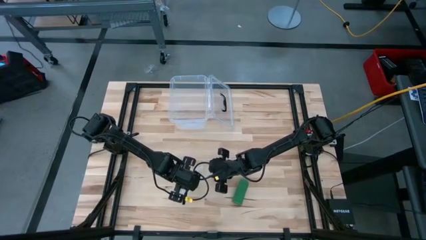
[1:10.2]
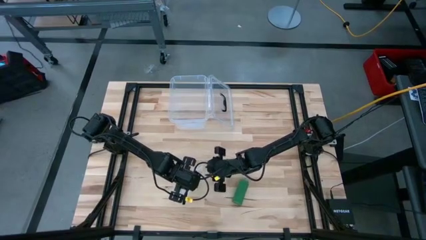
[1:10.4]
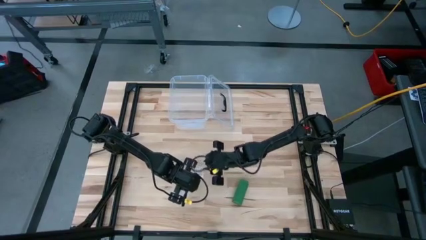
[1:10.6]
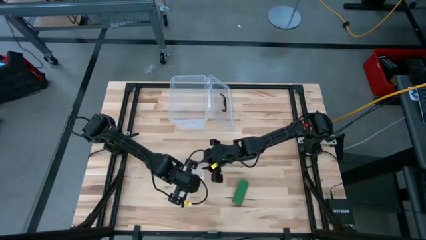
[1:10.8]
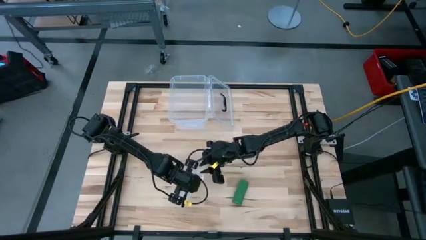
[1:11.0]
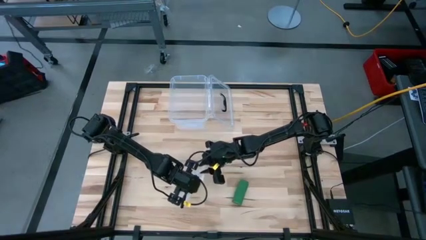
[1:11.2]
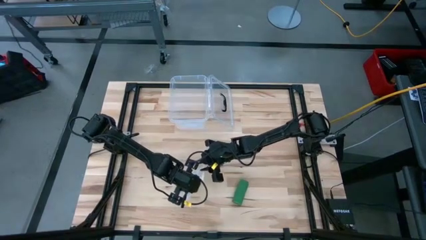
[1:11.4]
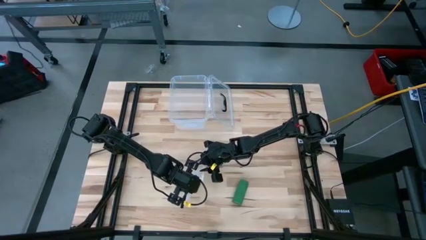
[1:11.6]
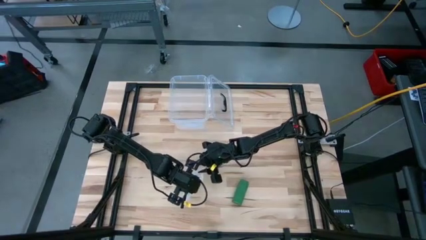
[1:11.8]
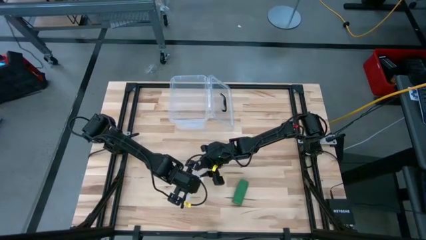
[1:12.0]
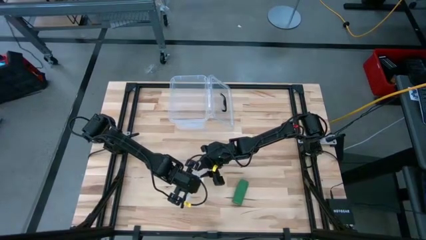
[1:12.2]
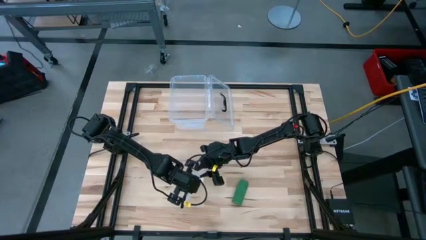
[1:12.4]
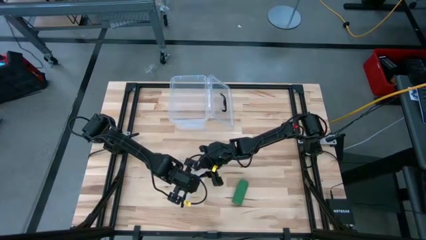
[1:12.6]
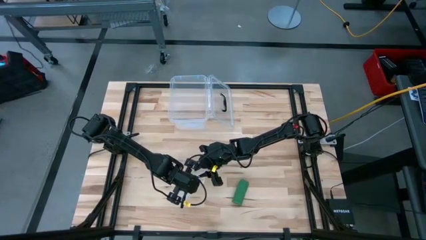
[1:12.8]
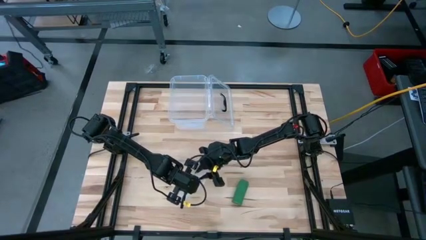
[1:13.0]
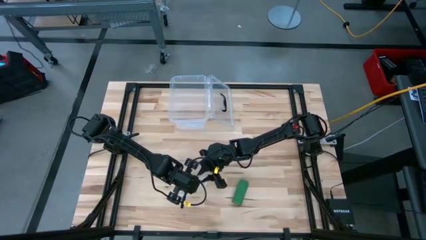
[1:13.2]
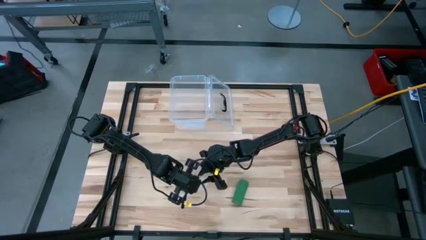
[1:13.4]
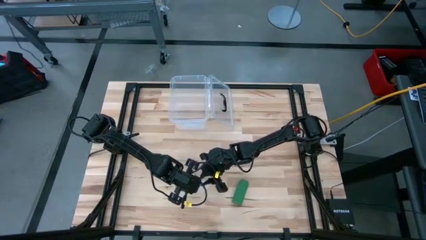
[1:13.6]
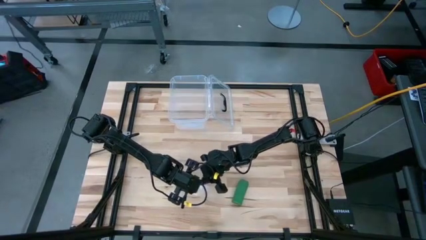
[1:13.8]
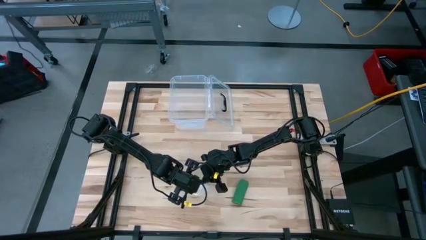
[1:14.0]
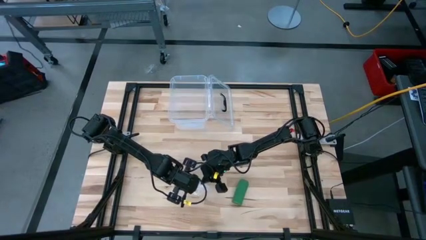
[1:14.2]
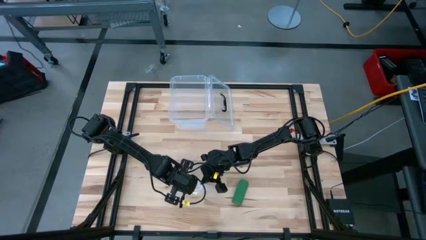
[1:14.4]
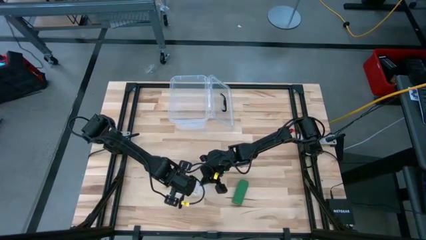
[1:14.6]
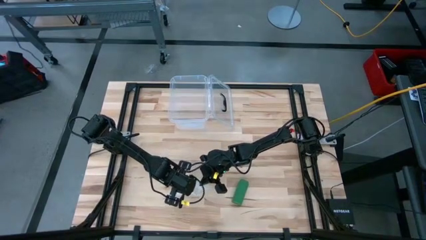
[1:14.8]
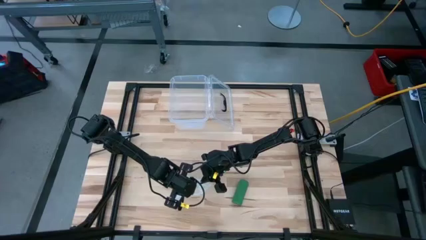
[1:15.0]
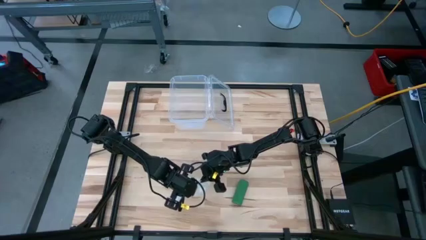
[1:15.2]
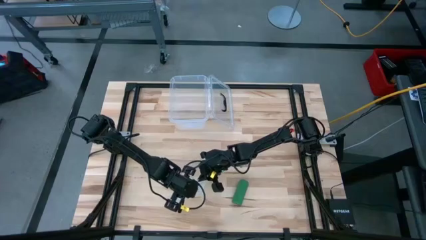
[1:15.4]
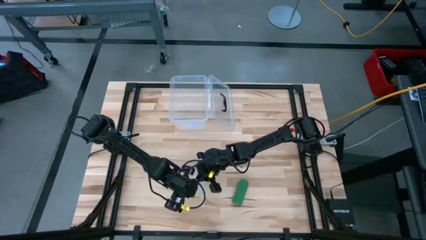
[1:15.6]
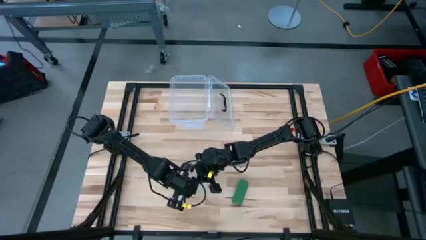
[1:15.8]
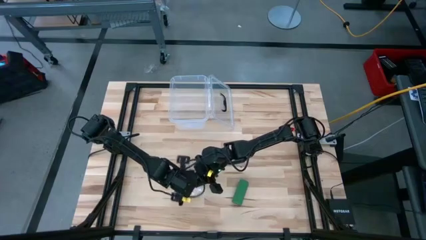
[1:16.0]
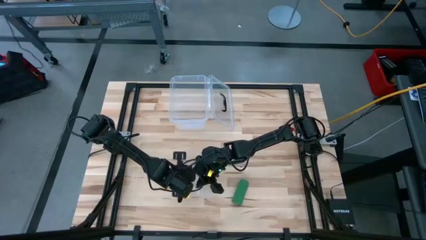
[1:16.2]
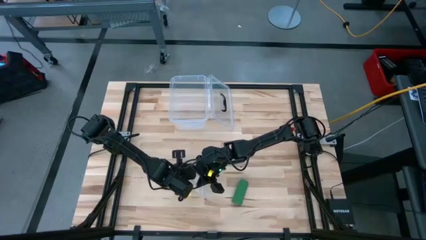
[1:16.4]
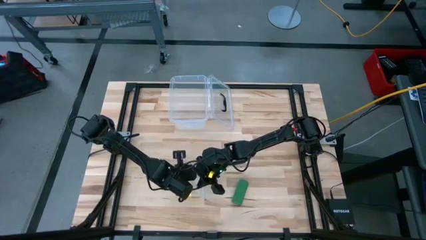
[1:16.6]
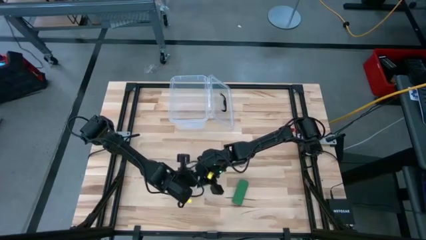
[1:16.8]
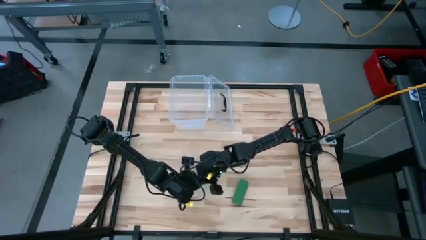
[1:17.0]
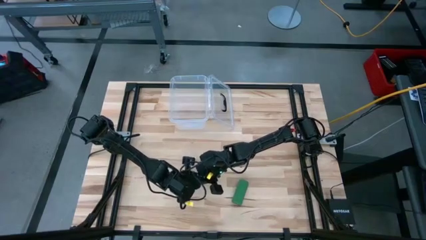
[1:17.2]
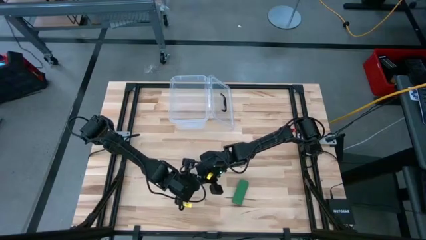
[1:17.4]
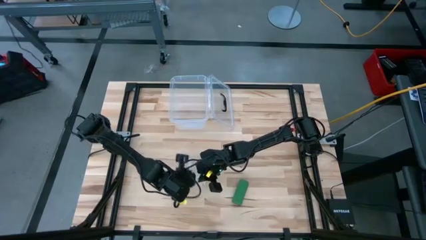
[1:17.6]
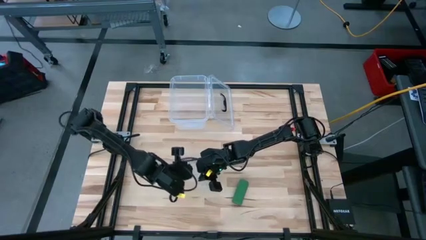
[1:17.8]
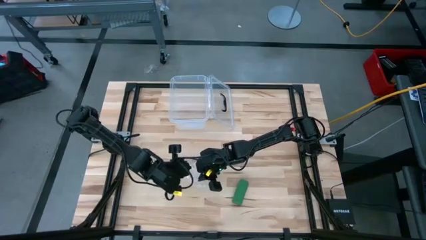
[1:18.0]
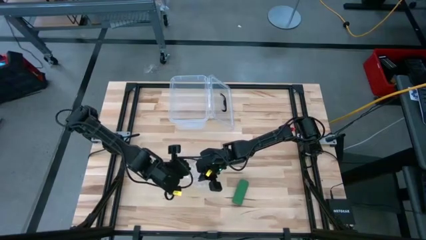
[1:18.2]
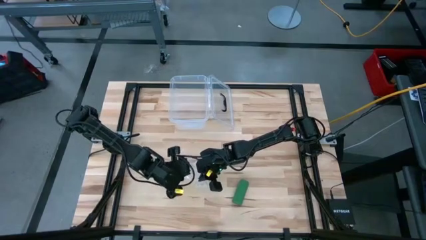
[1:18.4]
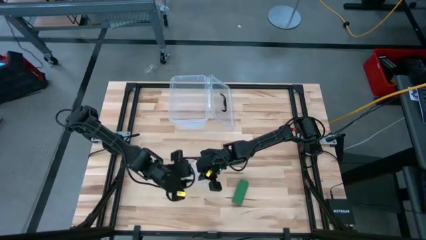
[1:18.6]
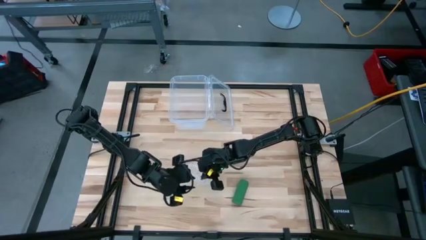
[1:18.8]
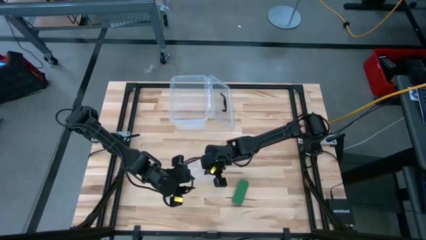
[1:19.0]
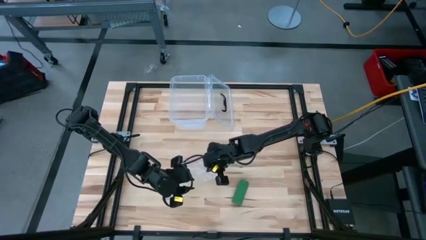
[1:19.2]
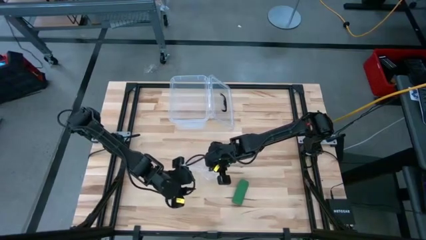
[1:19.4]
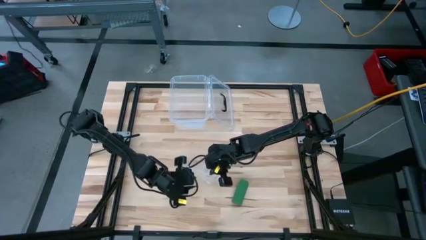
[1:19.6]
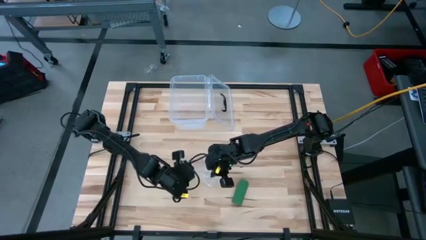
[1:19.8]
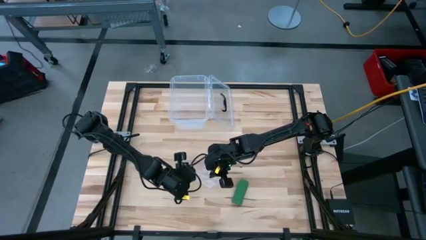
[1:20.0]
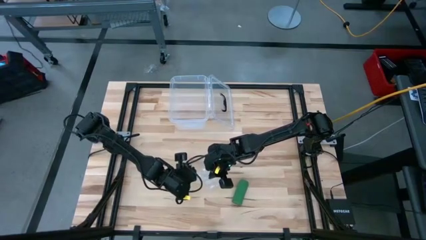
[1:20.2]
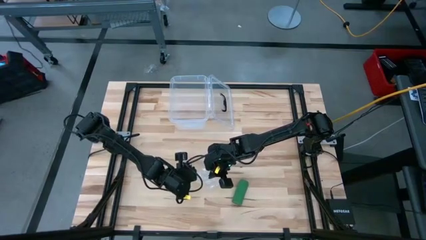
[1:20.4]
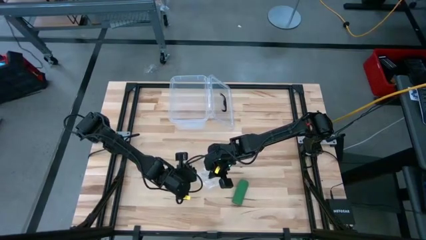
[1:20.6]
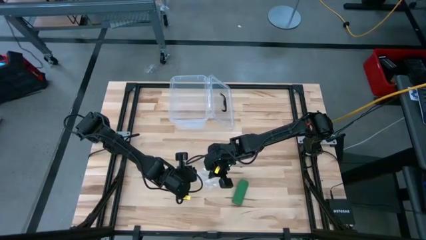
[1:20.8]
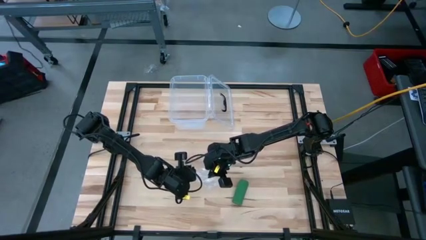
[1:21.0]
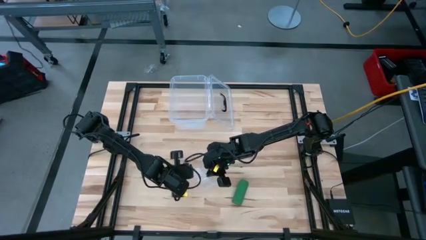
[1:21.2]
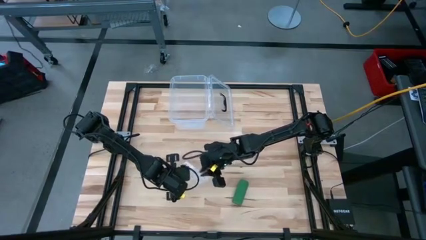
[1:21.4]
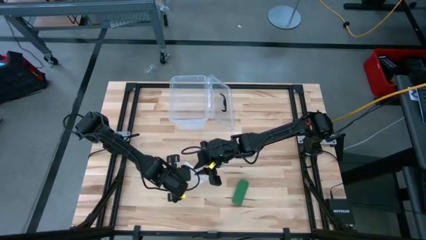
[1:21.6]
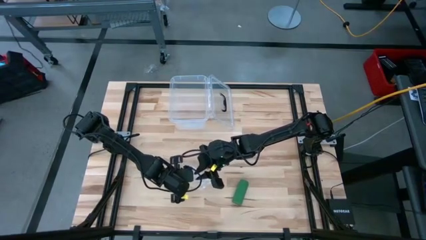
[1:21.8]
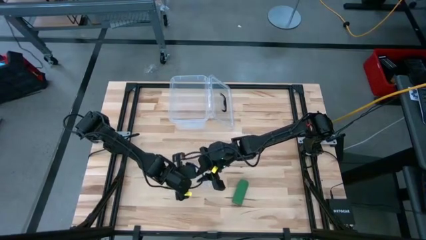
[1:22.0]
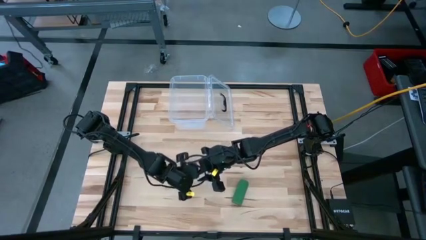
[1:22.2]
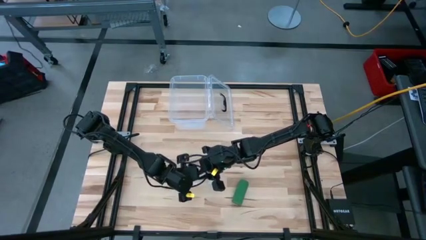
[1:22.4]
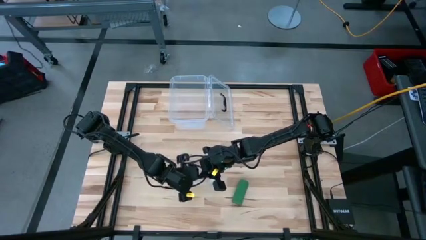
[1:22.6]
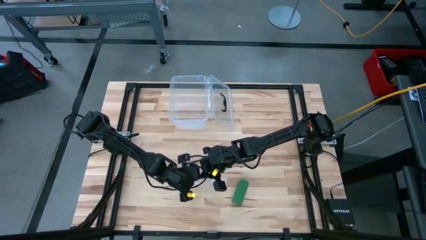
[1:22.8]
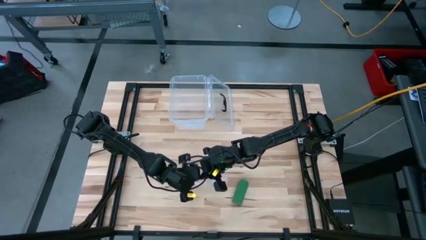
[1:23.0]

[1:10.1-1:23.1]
Task: Roll bandage
Prepare the transparent zip bag

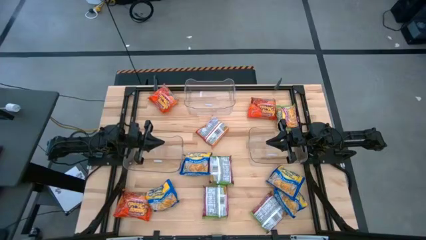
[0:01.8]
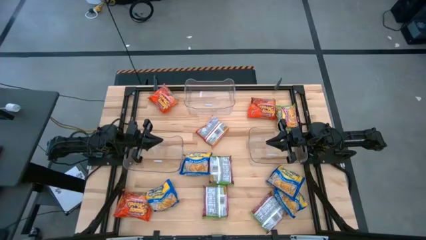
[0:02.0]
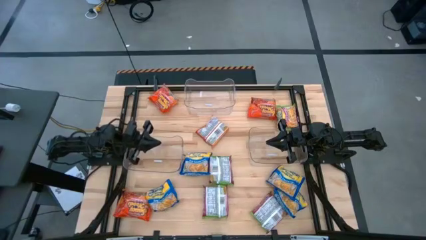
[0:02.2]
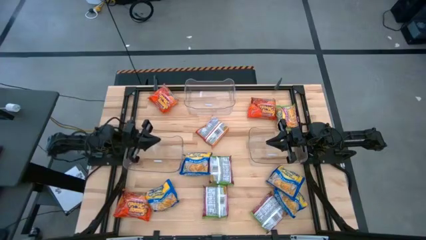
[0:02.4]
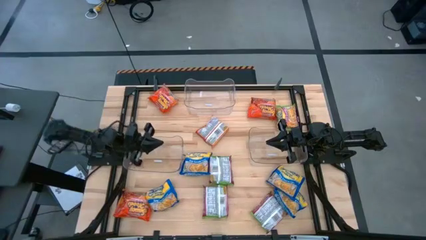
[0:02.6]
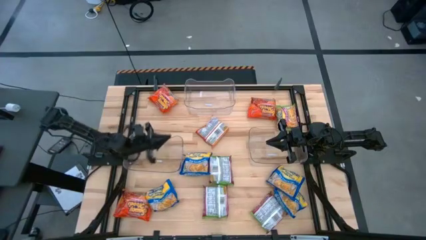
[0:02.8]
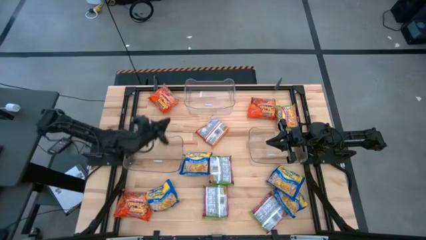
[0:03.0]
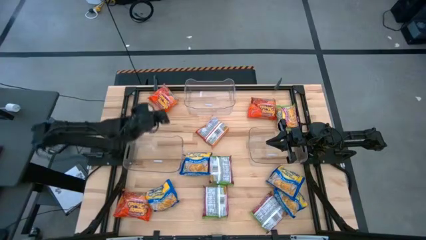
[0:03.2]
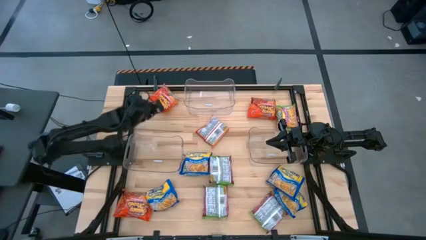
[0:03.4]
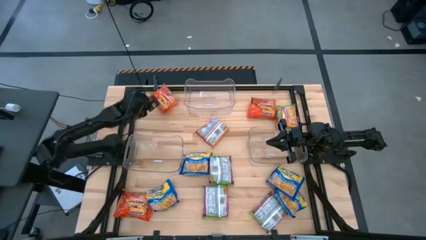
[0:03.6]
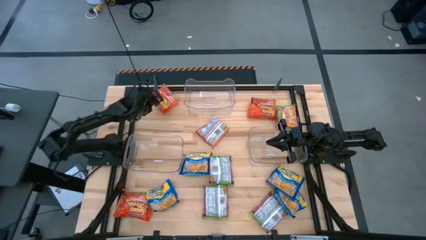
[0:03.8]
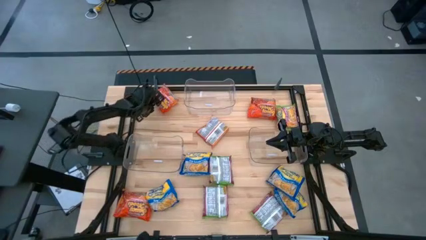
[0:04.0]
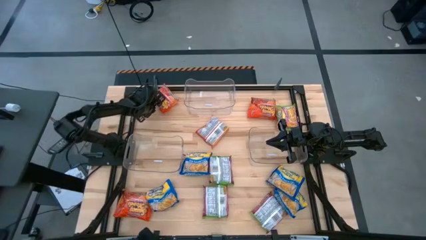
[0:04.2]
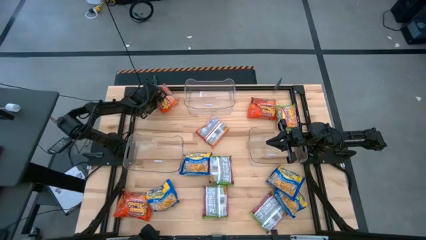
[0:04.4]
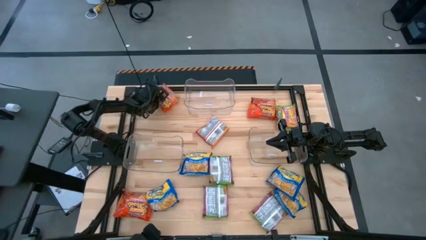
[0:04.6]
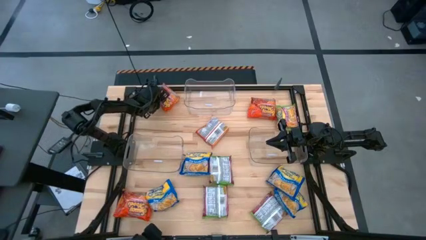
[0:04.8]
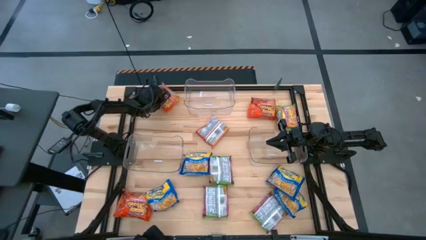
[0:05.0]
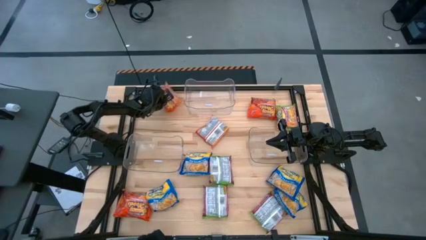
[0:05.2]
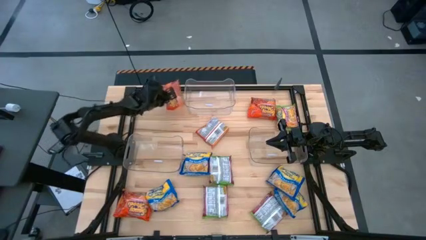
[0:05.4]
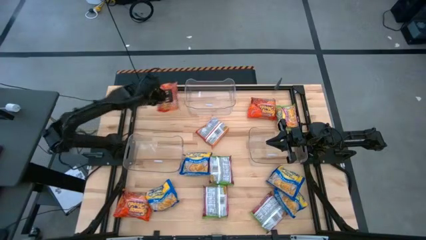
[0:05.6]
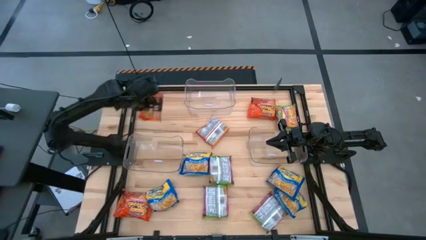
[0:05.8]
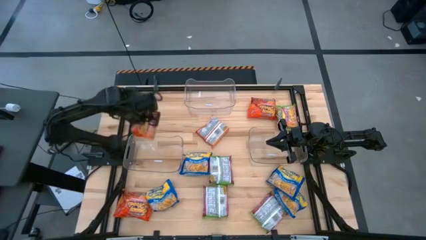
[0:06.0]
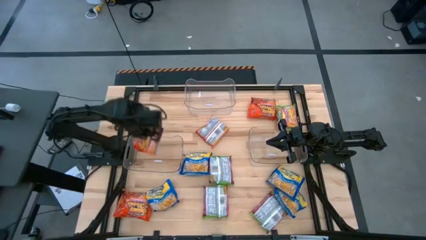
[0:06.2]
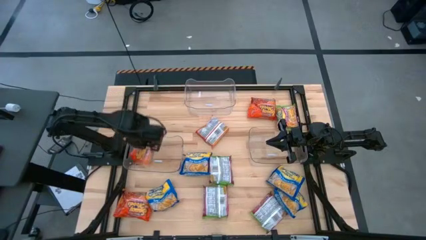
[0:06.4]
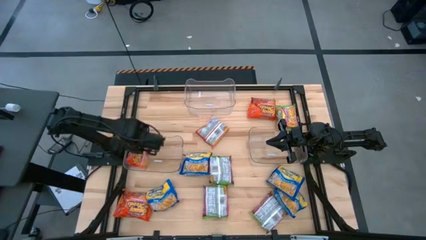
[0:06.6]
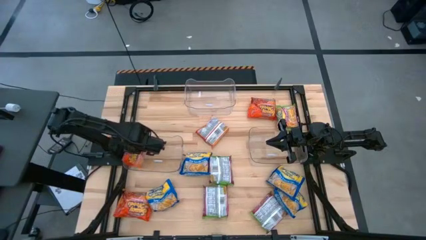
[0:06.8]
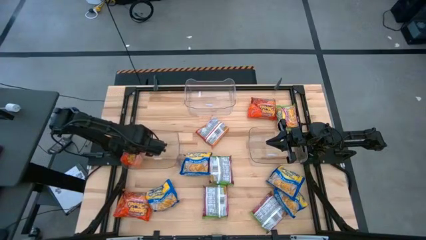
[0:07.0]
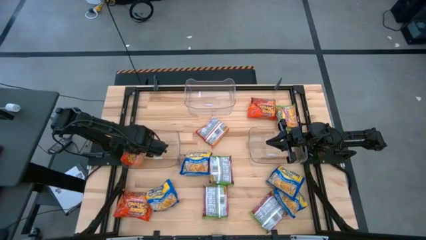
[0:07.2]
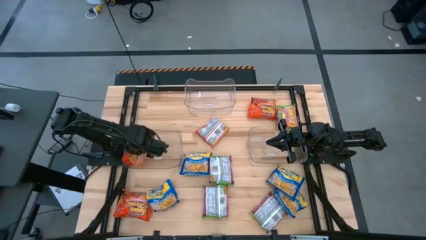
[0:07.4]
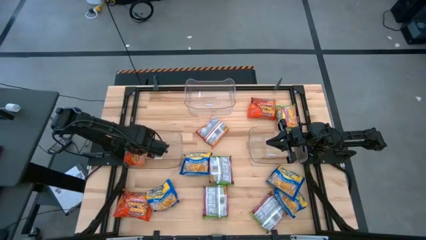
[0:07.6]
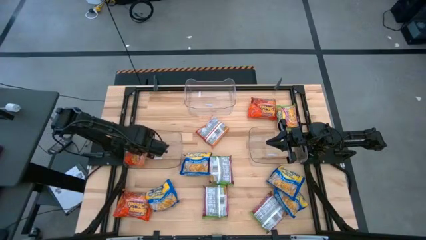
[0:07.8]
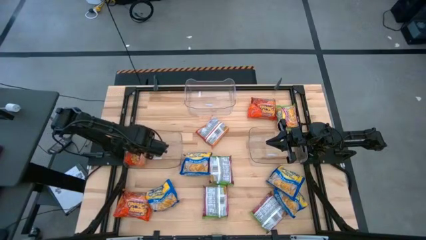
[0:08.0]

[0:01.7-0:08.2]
Task: Sort Maruchan noodles
Put the orange noodle from the top left into the middle left transparent bin
